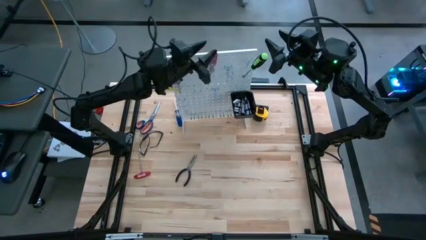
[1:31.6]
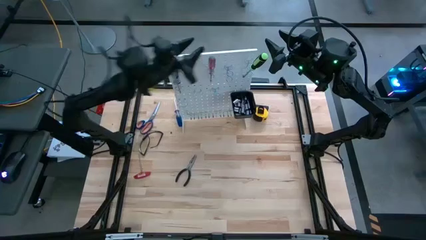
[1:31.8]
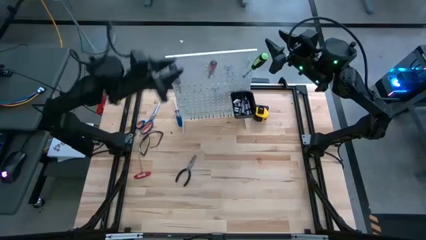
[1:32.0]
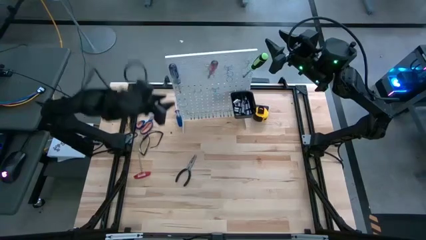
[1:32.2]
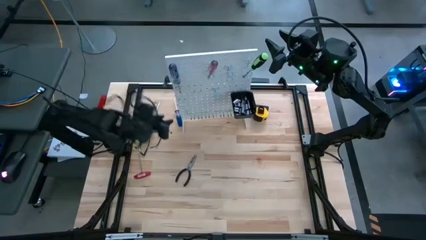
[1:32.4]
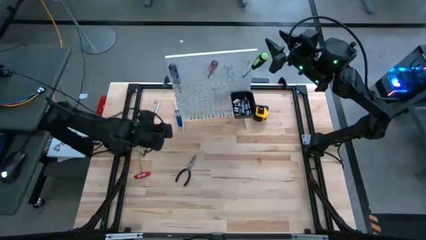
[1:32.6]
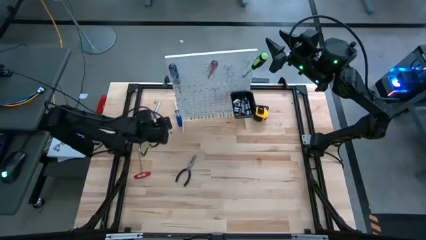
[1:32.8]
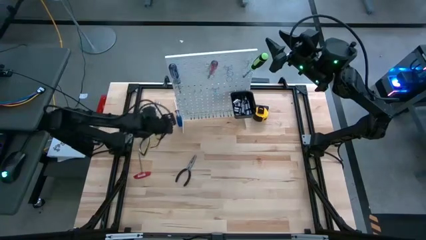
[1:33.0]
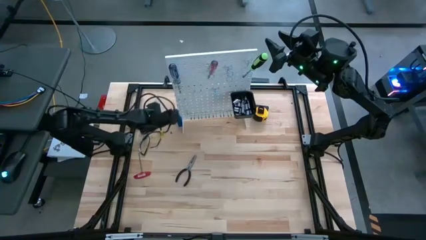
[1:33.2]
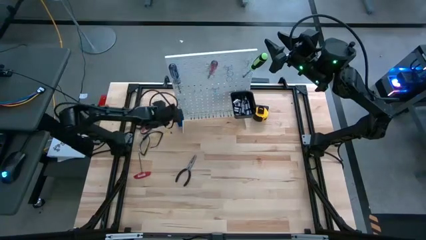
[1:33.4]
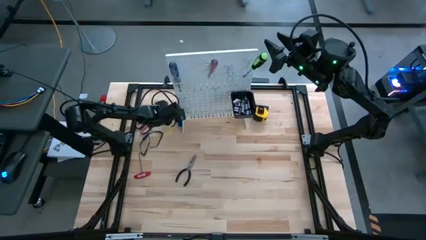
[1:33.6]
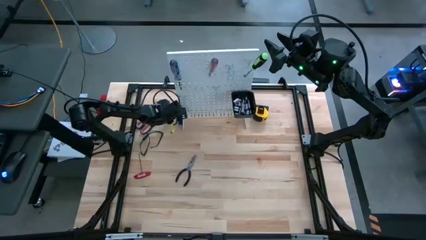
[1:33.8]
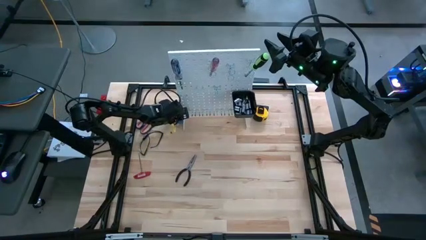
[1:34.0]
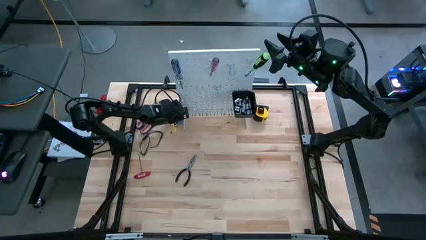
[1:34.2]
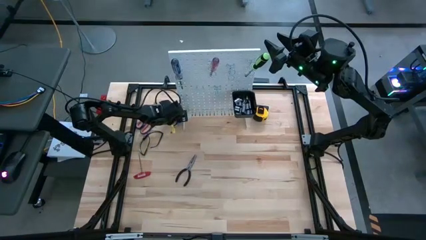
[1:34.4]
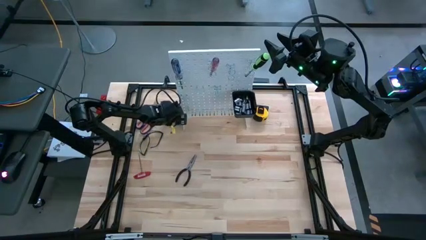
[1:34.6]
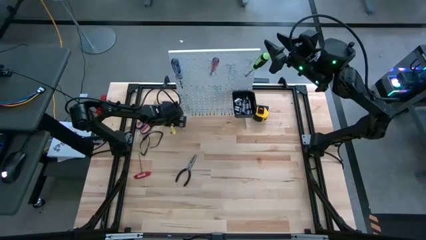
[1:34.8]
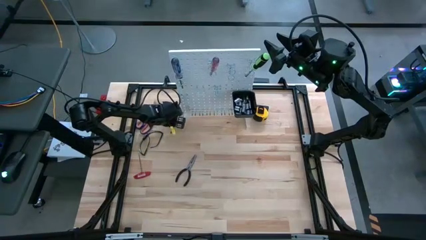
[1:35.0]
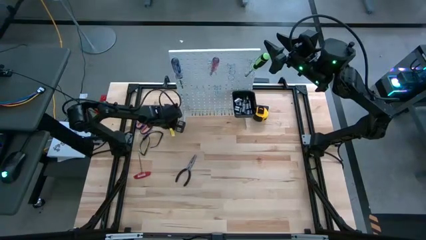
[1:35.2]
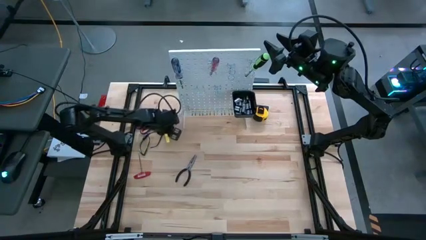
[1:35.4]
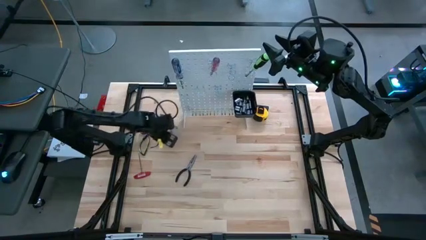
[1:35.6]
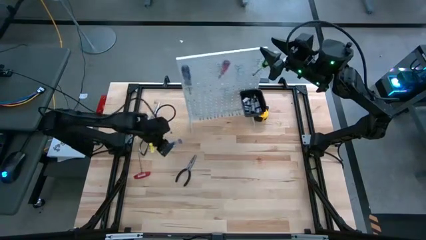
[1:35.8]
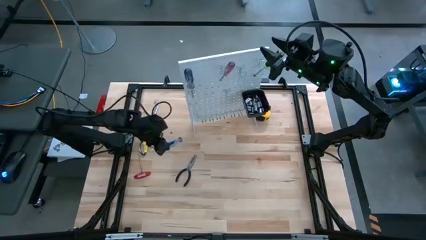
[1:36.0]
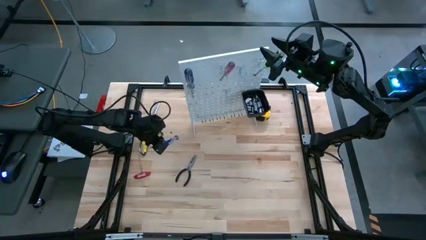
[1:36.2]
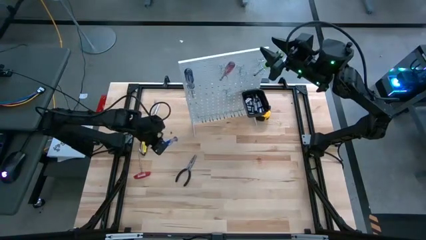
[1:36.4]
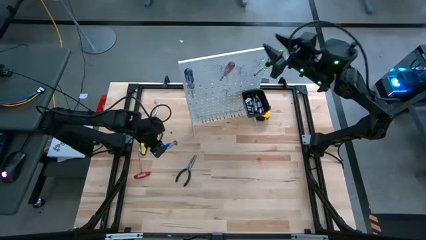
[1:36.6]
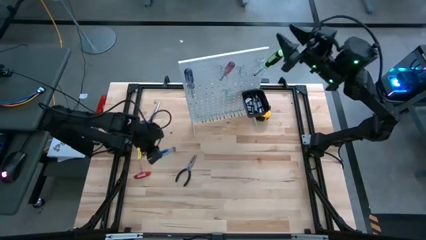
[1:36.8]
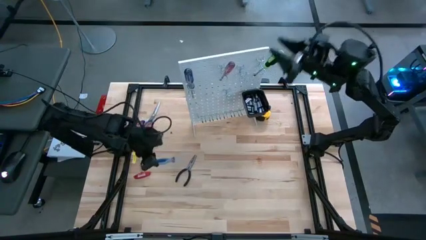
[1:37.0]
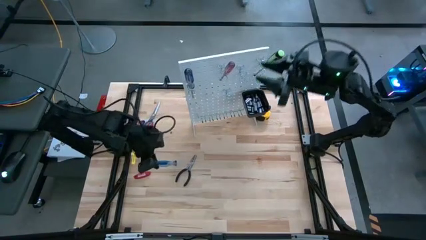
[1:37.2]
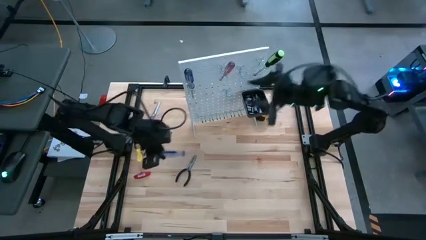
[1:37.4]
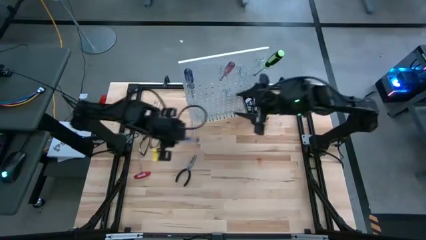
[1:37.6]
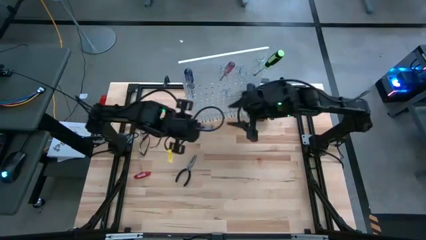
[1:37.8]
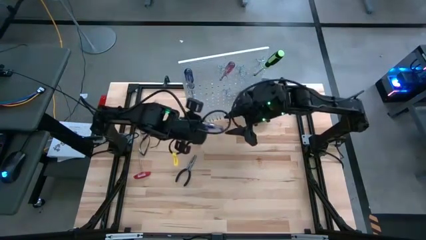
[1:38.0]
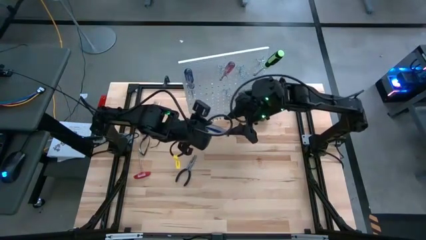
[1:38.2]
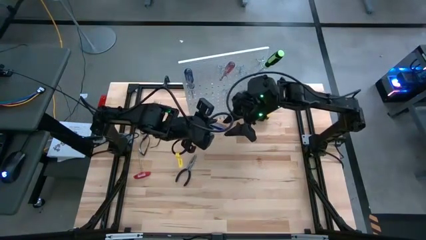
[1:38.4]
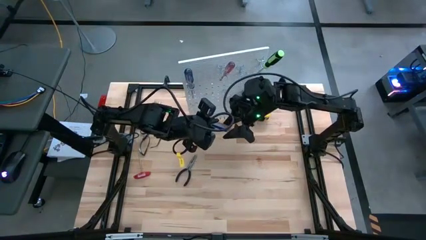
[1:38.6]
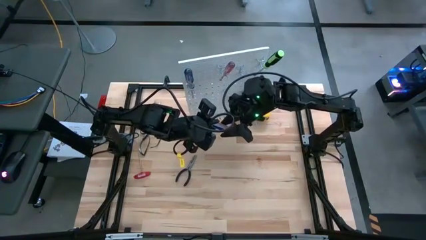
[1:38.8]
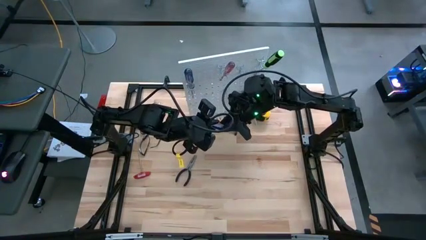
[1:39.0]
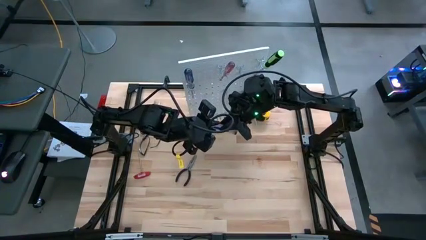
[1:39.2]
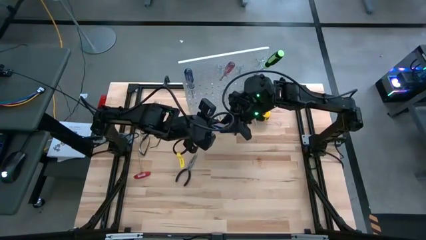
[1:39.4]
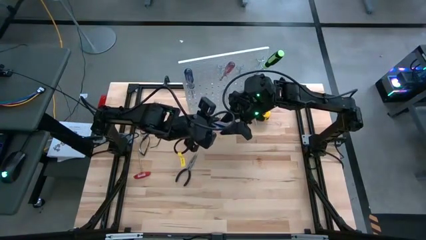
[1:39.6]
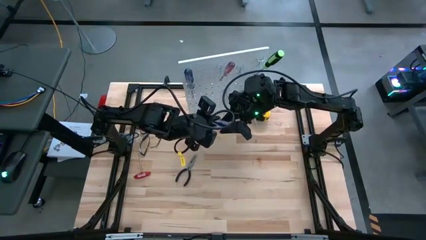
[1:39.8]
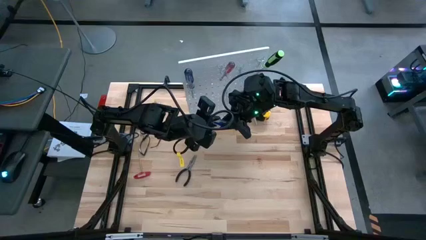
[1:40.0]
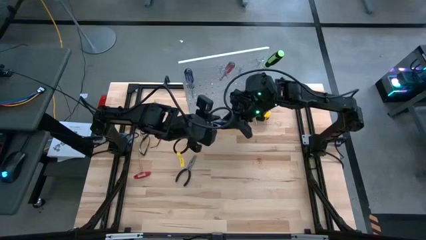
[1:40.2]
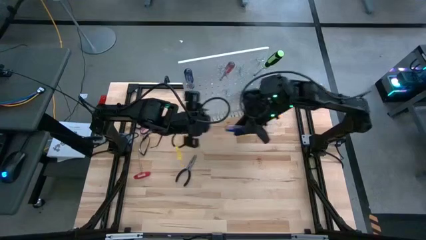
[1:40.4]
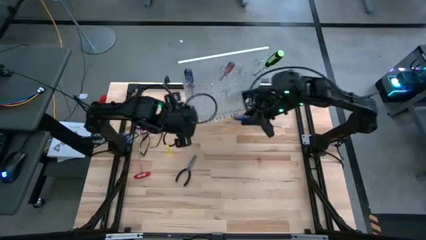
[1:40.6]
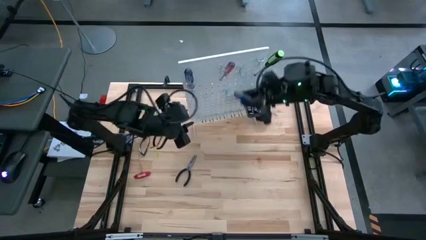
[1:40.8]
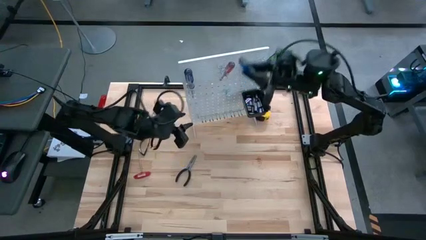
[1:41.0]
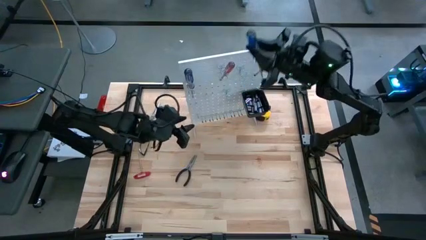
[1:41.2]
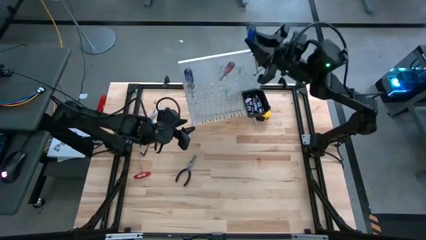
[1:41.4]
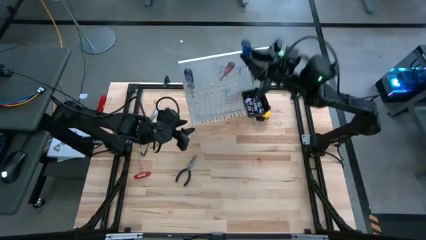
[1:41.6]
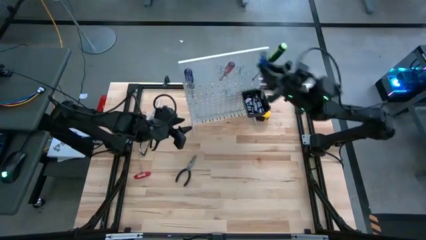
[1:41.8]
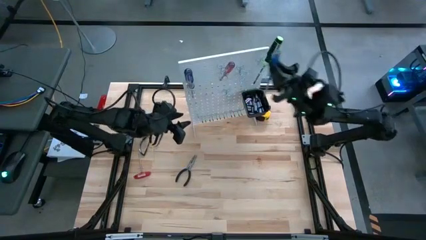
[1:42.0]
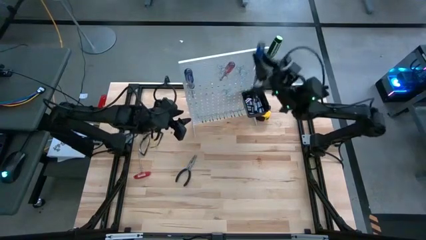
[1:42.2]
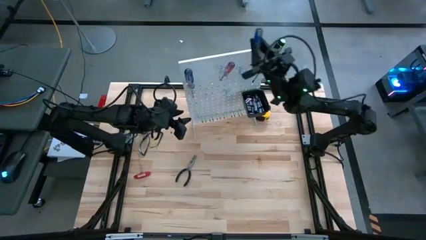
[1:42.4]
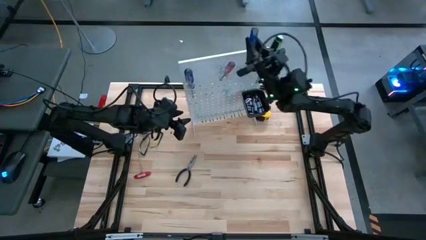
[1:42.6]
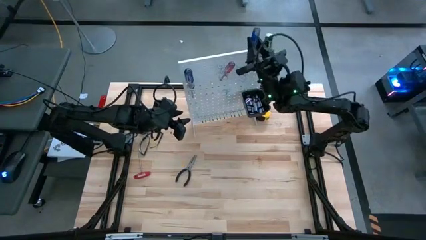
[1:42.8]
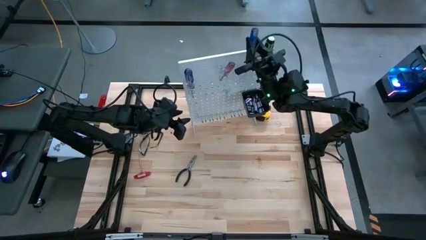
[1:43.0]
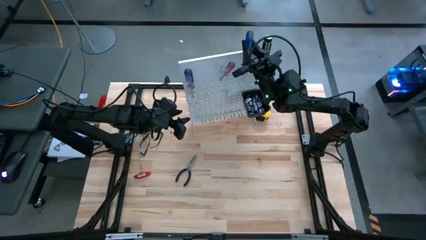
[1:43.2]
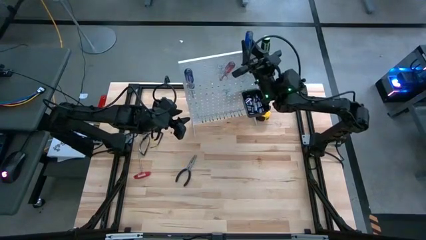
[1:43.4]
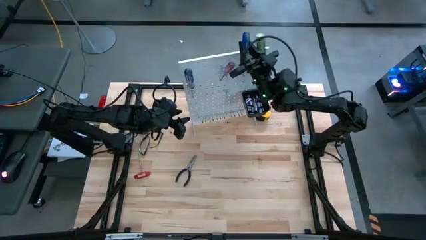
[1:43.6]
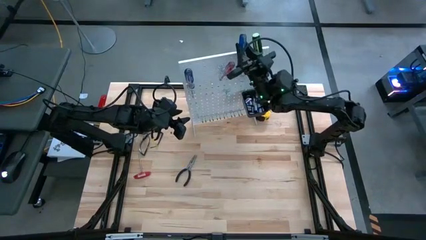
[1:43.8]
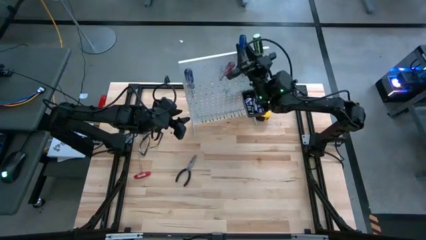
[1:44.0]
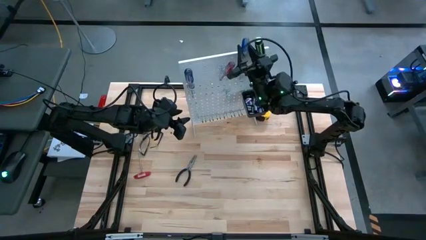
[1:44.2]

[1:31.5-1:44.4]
Task: Hang tools onto peg board
Hang the blue screwdriver on the peg board

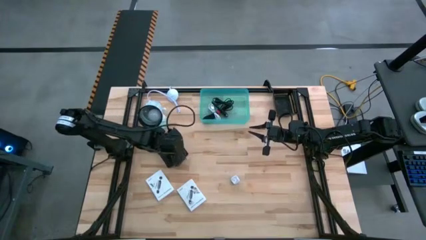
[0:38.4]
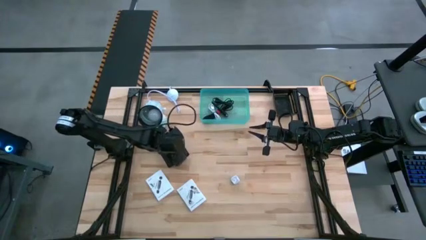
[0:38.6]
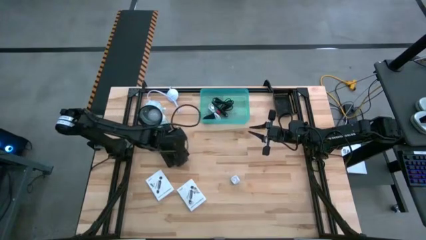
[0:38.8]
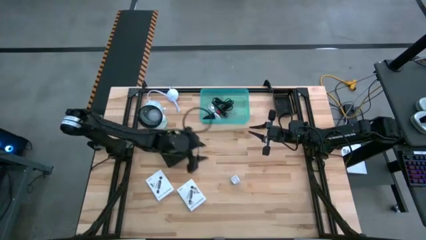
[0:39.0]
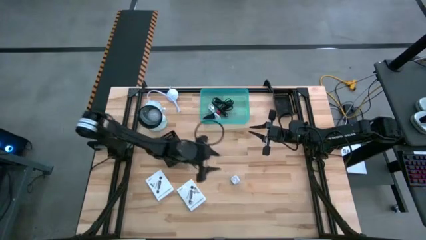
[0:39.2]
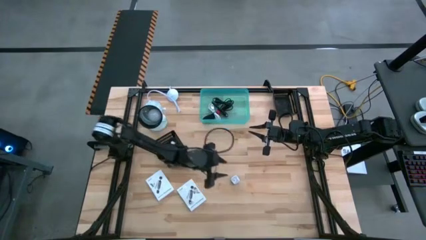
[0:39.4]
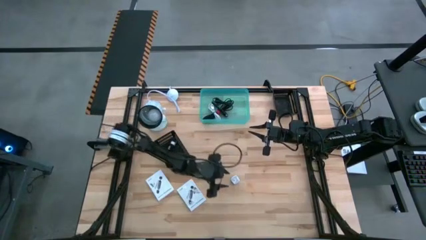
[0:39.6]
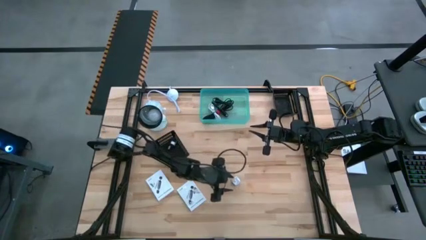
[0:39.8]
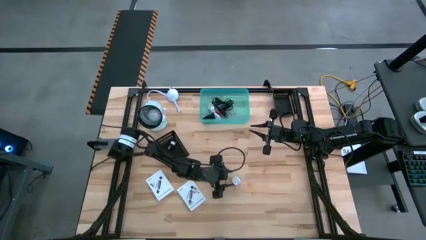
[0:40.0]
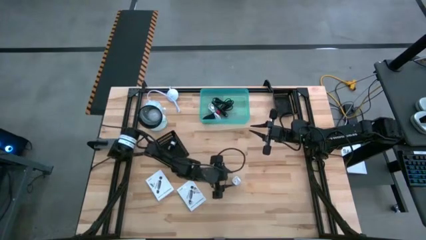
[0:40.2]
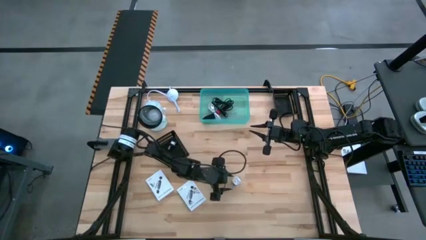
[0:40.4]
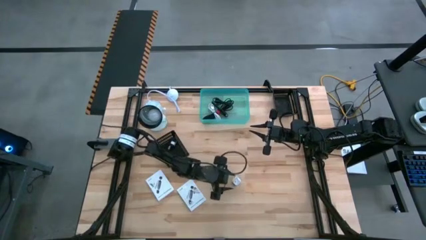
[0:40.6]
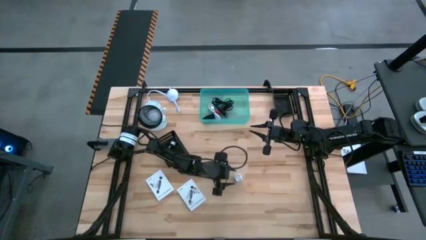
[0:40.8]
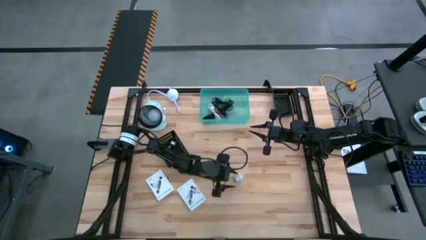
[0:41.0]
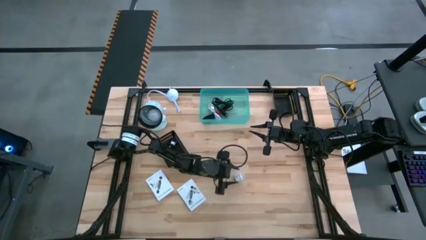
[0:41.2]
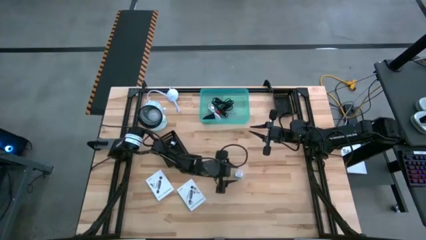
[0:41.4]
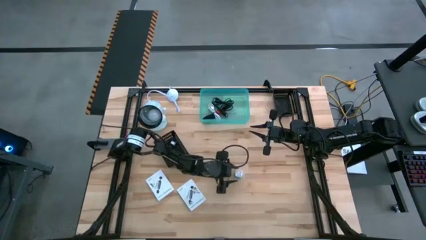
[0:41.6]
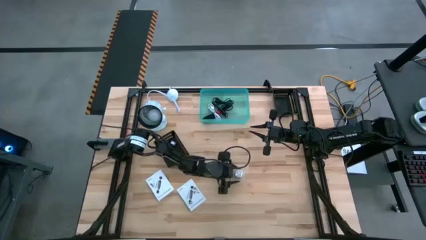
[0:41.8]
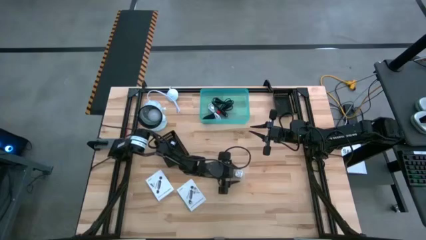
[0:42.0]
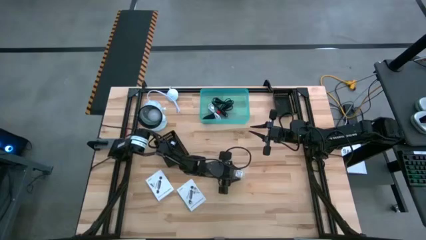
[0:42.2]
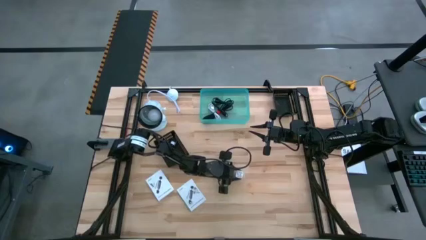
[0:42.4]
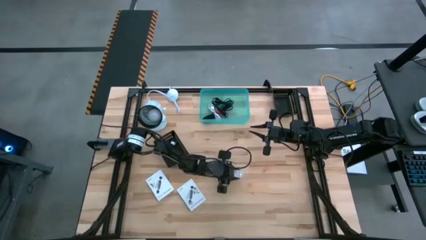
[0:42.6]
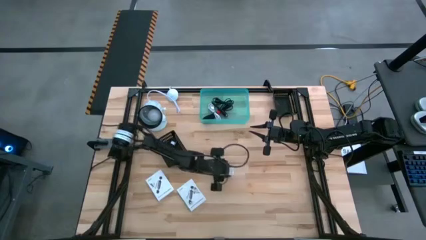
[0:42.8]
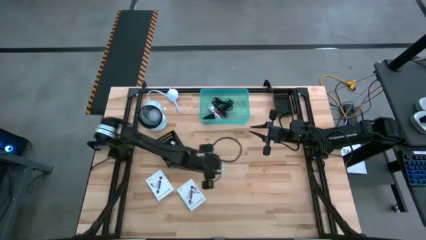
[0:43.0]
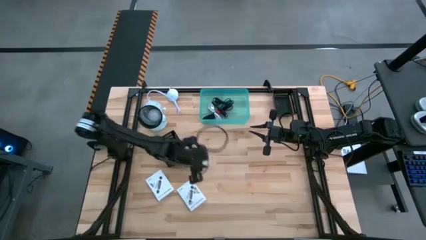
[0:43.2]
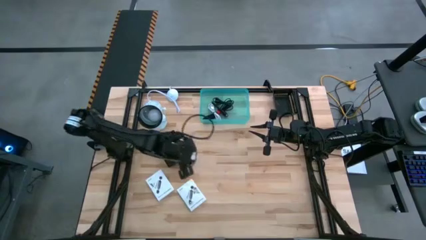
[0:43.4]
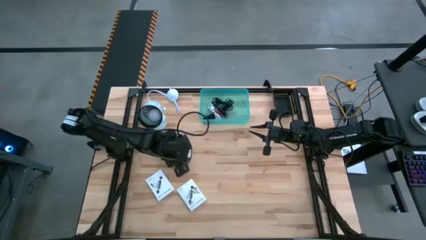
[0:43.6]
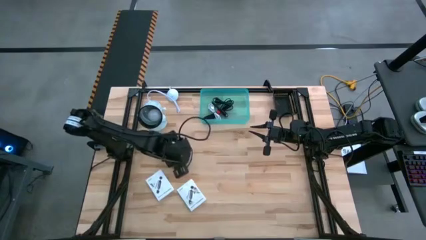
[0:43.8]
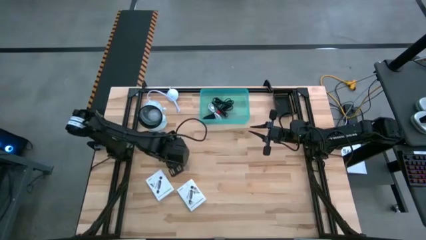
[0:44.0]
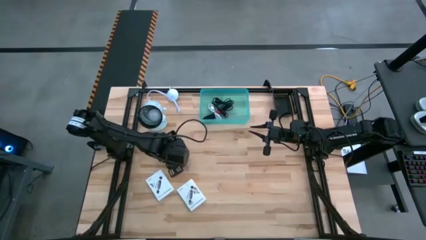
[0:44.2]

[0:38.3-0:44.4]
Task: Pick and place items into bin
Put the blue charger adapter into the left black basket
